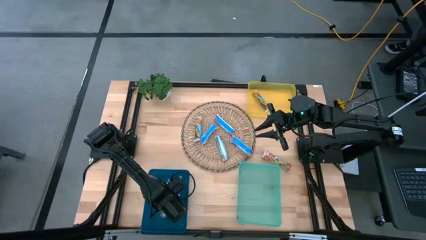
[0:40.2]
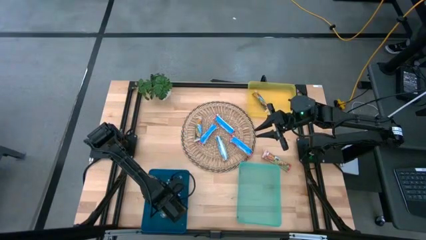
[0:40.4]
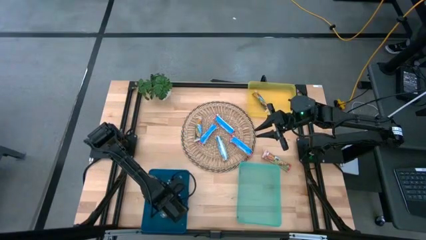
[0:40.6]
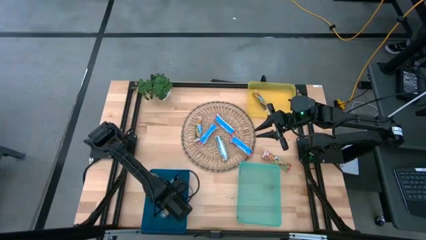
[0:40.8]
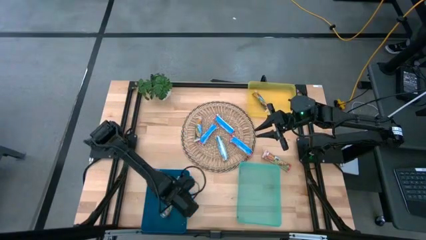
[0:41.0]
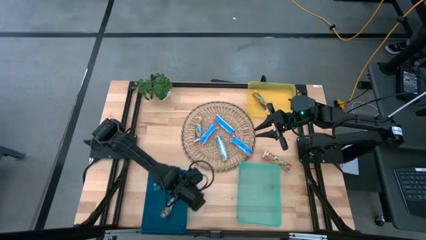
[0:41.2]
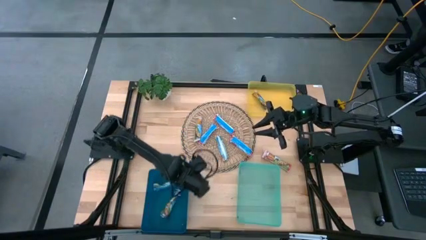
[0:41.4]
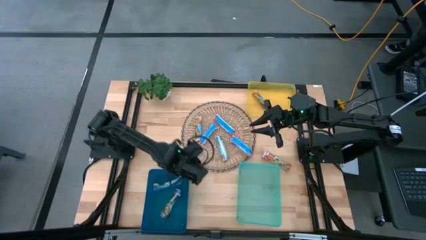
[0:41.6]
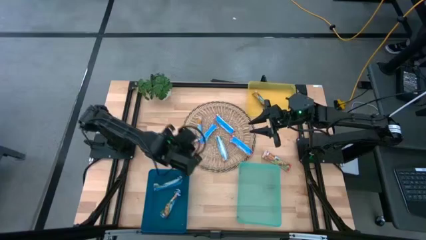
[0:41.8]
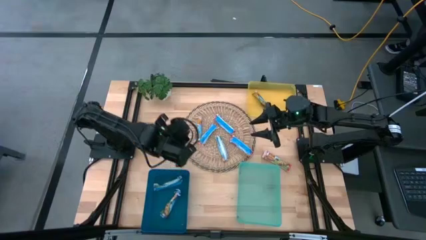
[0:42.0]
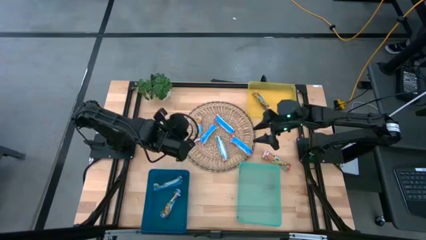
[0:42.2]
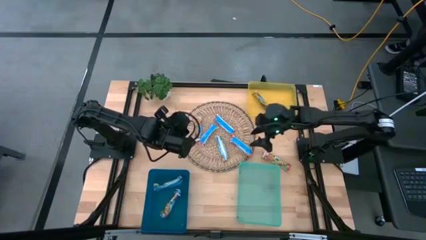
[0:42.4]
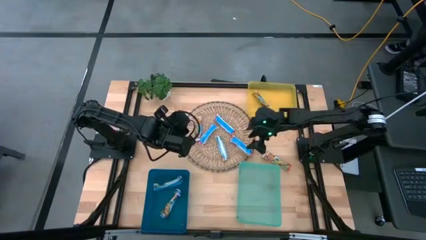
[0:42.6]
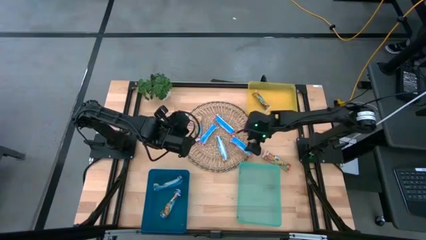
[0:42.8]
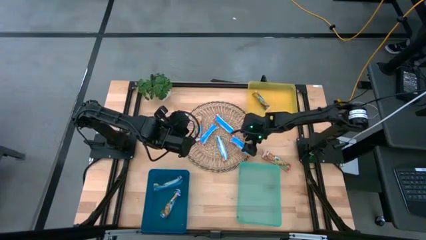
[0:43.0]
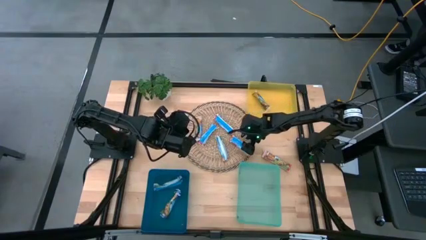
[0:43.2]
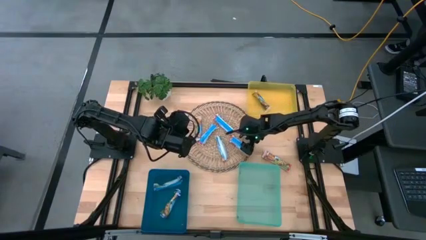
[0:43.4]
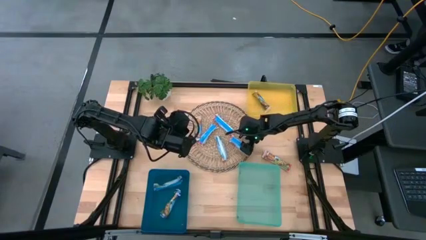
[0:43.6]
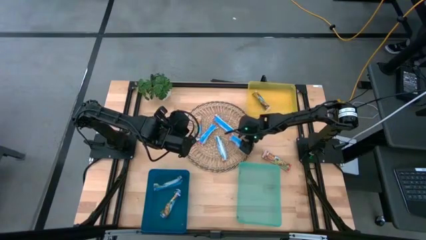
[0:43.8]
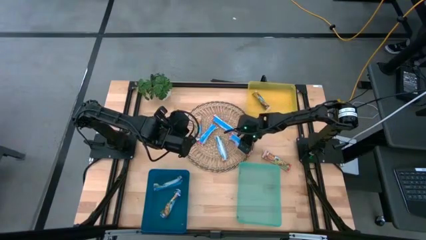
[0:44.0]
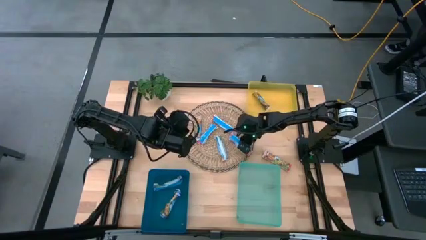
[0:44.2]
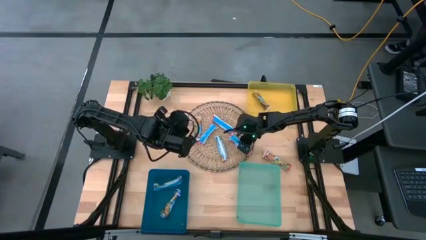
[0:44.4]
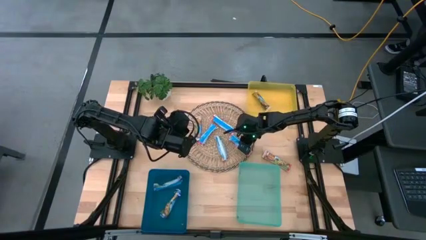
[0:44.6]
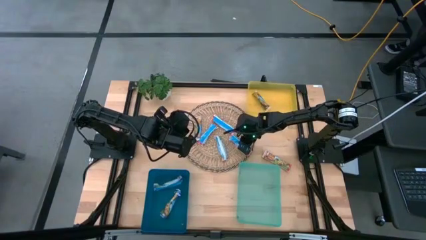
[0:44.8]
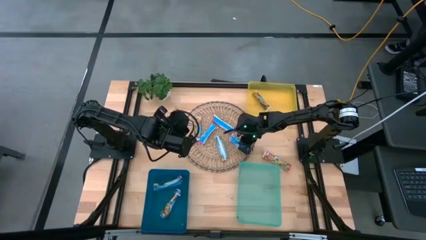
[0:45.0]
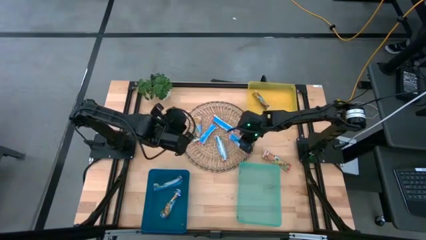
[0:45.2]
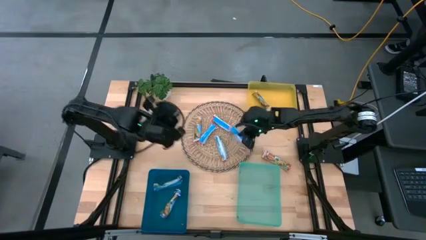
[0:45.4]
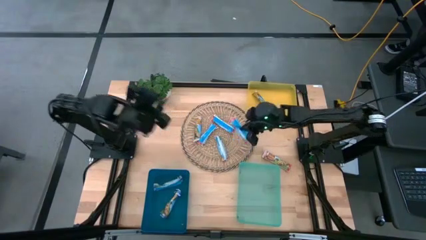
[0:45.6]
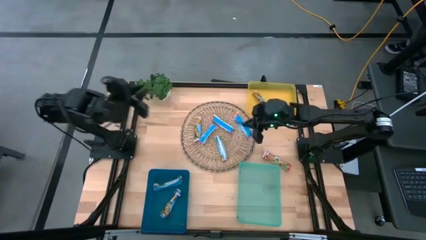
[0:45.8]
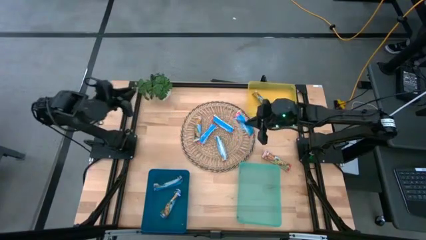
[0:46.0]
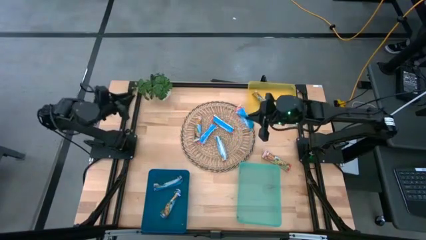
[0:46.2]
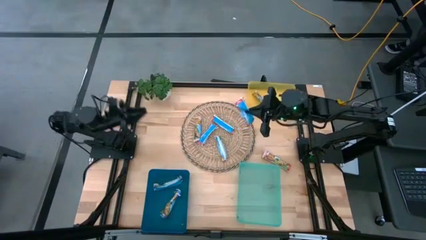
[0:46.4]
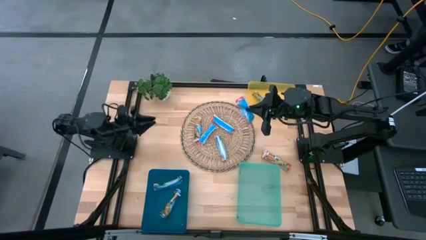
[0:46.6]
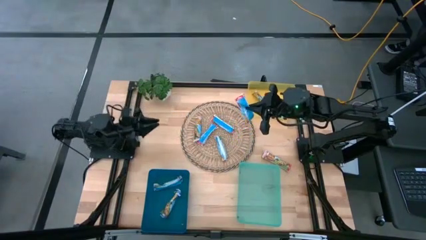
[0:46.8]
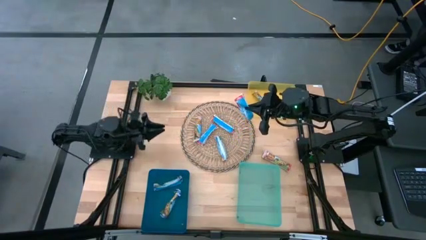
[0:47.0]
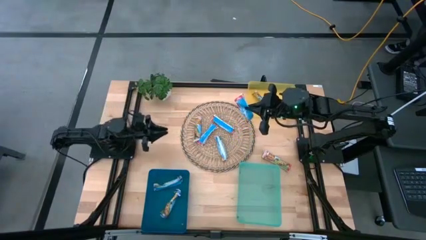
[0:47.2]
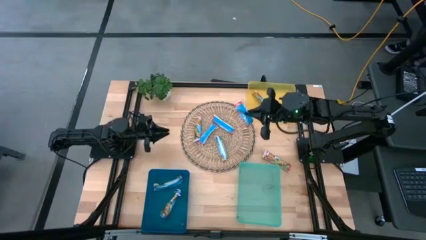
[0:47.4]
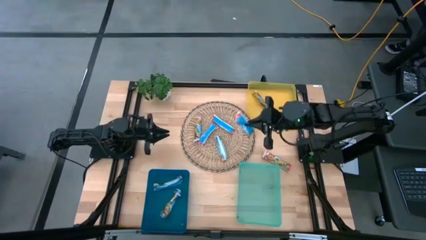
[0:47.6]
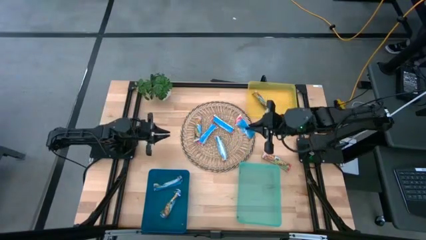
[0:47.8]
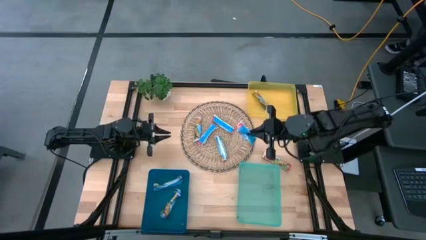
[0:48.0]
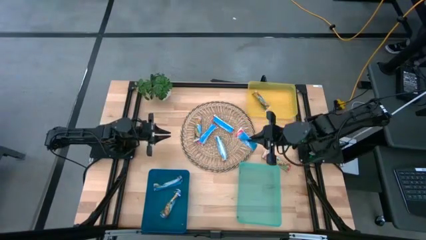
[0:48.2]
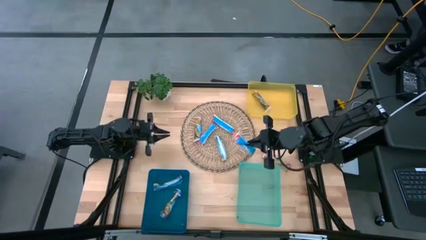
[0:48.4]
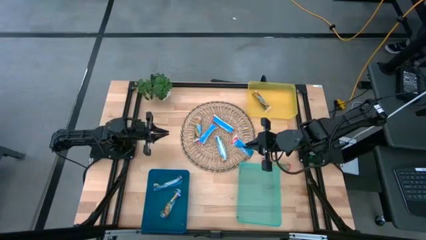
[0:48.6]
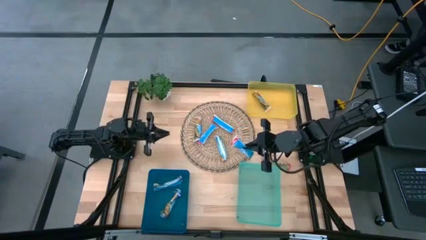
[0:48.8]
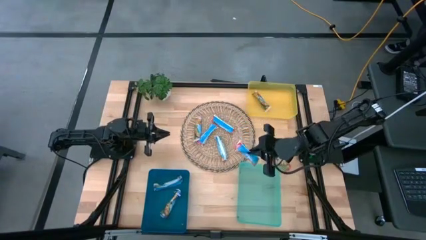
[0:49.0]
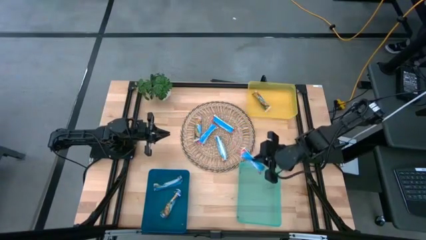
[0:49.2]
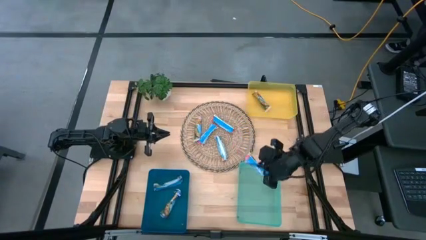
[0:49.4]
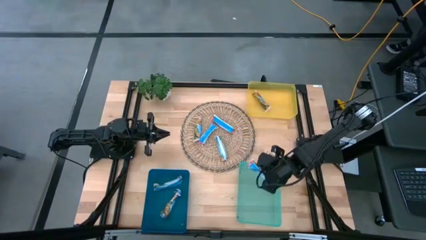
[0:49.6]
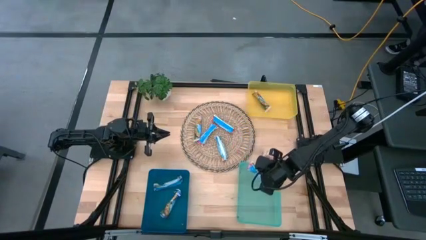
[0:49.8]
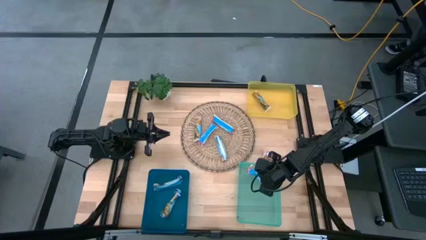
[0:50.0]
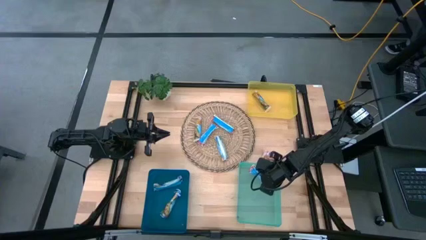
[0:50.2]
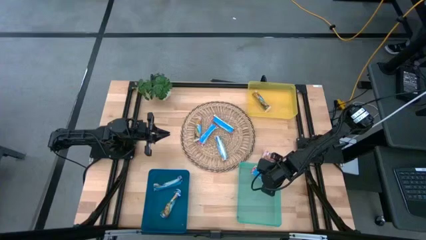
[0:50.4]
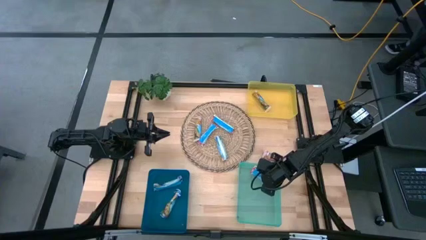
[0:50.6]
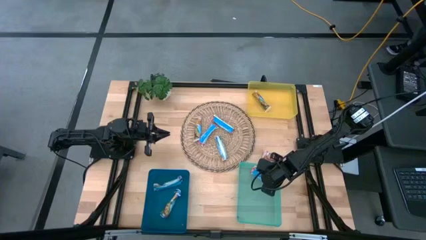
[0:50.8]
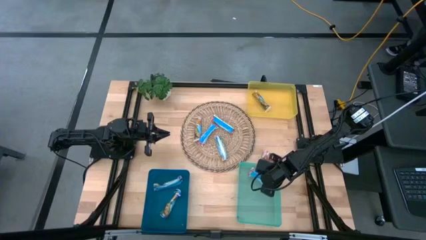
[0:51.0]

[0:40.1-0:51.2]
Task: Pick and place Granola Bars by type
Put the red granola bar into the green bin
